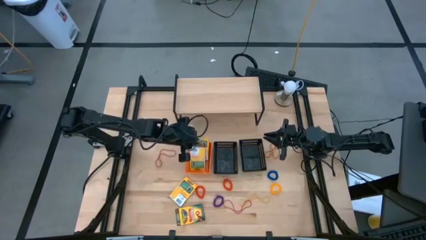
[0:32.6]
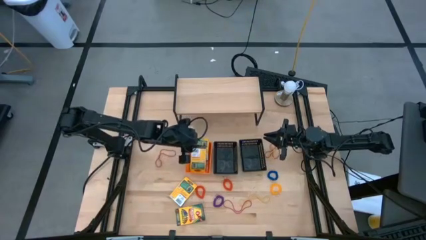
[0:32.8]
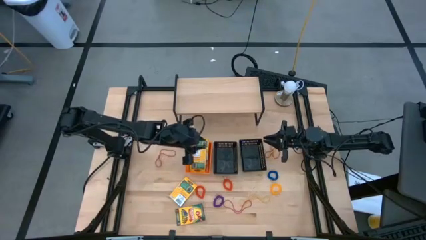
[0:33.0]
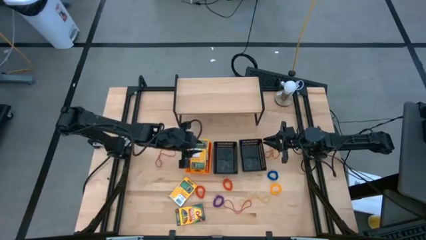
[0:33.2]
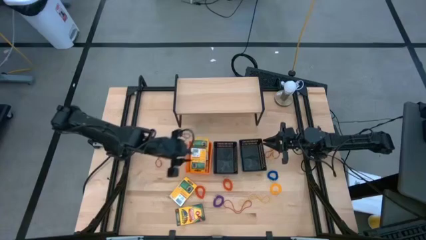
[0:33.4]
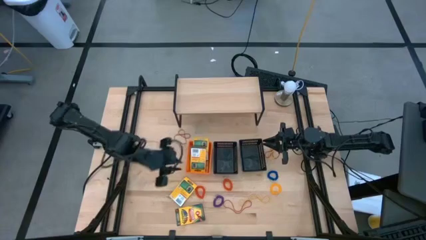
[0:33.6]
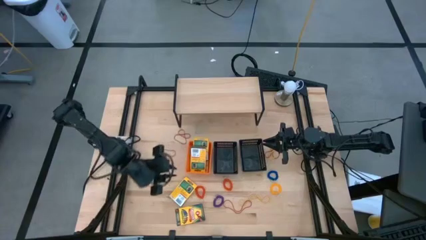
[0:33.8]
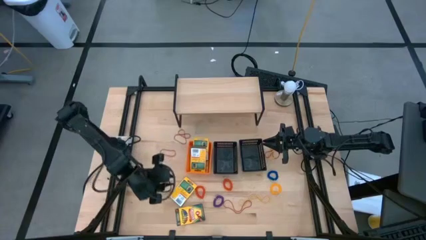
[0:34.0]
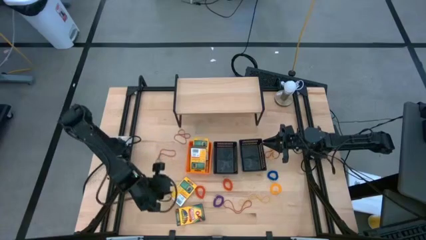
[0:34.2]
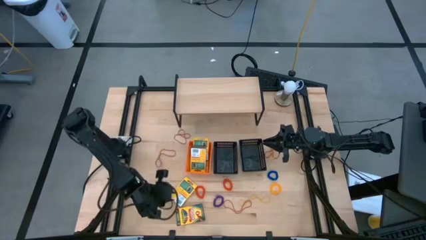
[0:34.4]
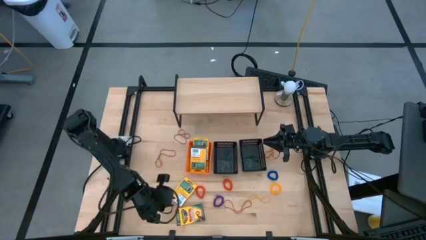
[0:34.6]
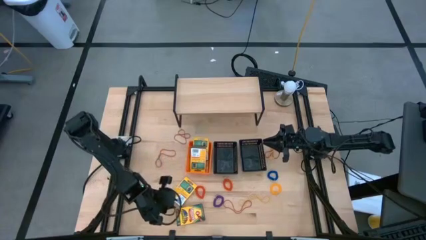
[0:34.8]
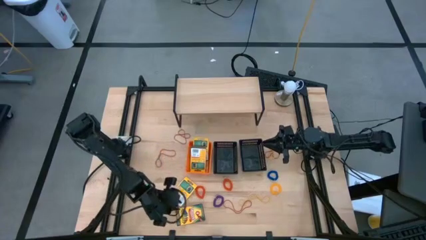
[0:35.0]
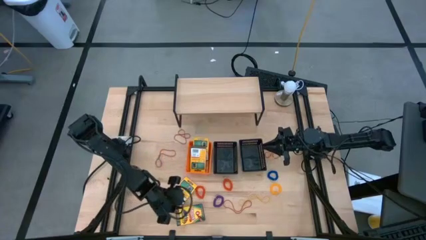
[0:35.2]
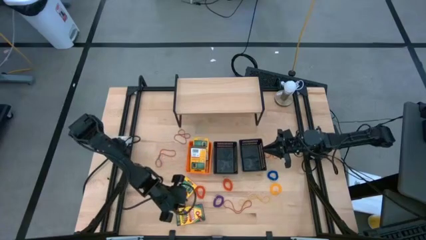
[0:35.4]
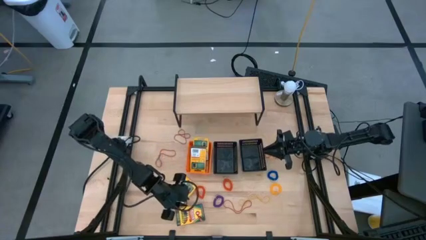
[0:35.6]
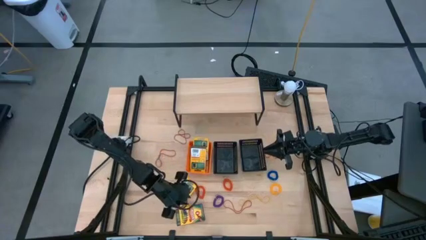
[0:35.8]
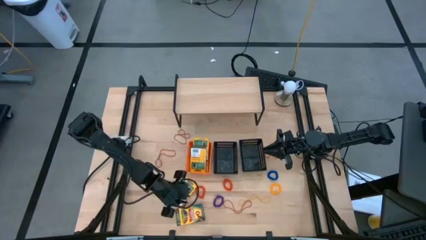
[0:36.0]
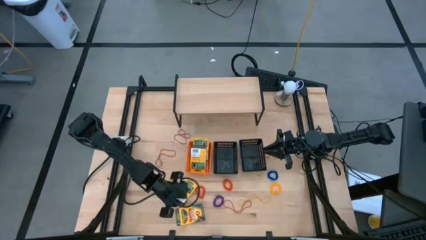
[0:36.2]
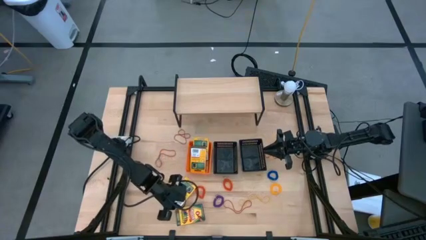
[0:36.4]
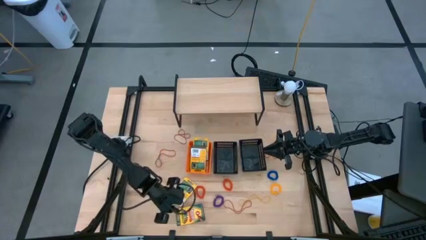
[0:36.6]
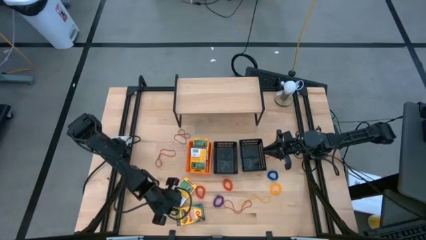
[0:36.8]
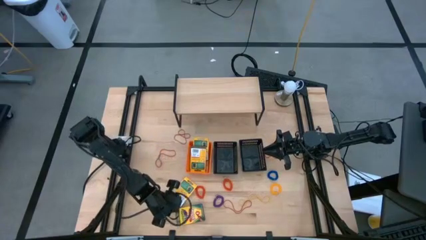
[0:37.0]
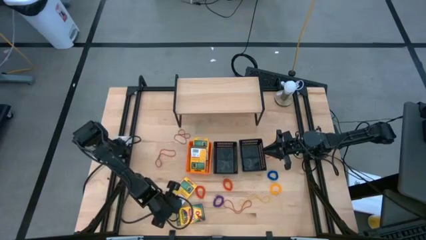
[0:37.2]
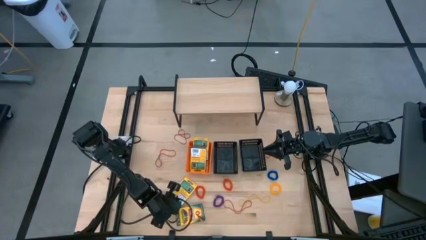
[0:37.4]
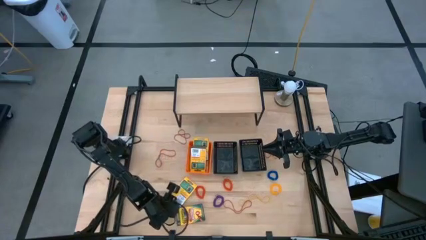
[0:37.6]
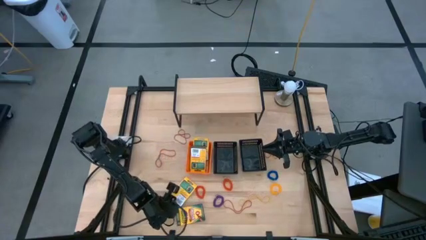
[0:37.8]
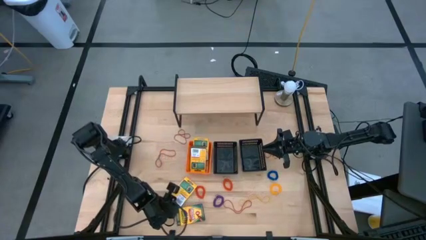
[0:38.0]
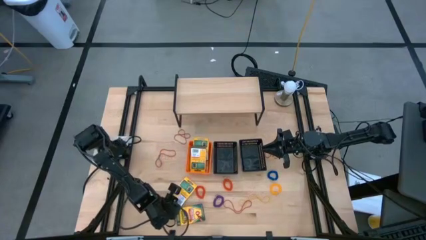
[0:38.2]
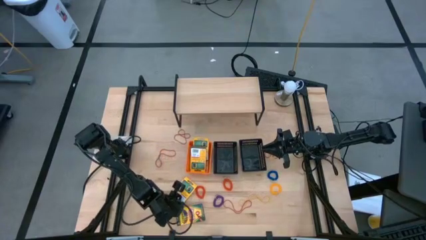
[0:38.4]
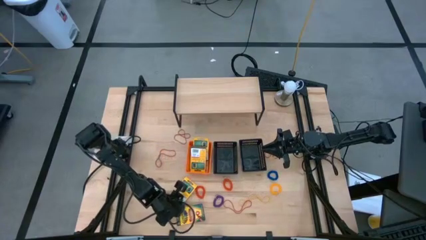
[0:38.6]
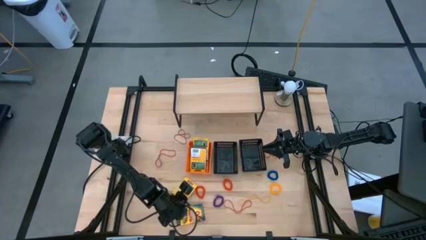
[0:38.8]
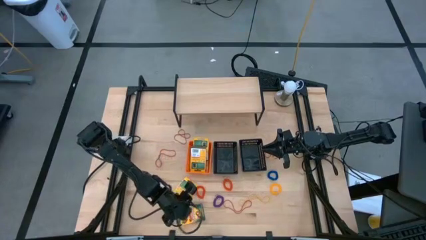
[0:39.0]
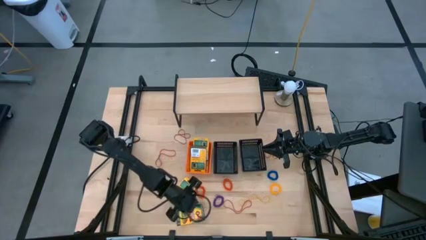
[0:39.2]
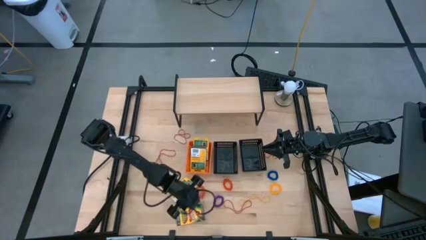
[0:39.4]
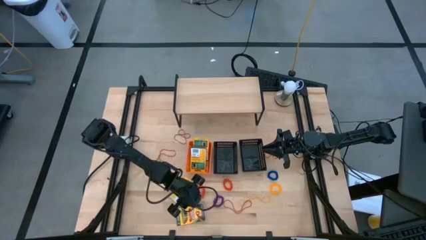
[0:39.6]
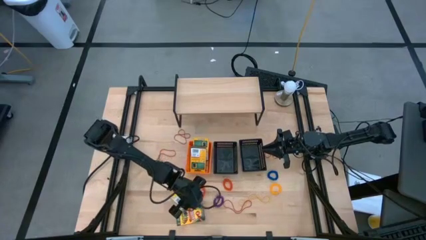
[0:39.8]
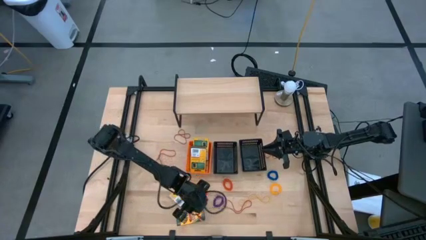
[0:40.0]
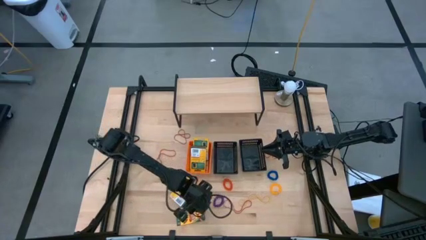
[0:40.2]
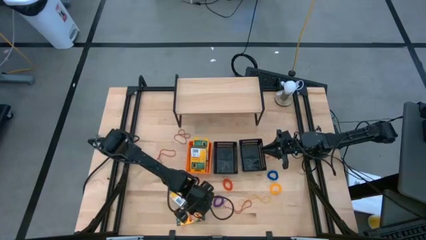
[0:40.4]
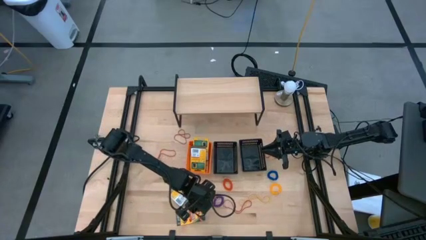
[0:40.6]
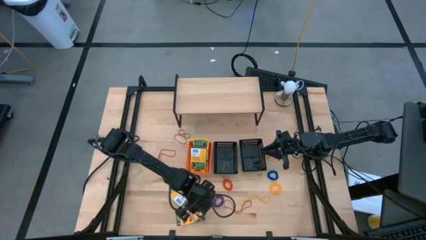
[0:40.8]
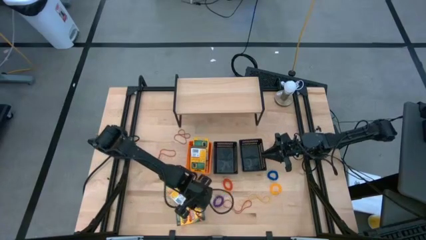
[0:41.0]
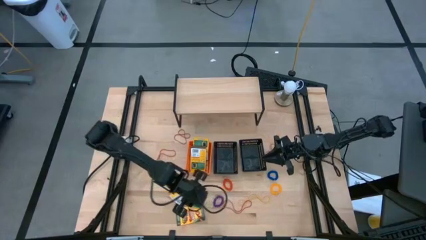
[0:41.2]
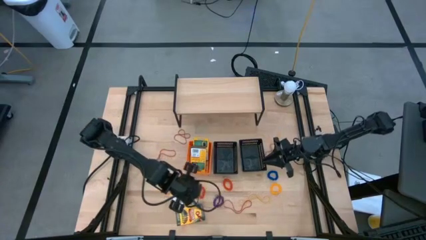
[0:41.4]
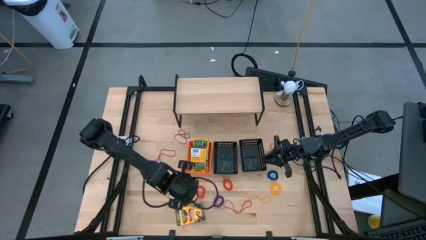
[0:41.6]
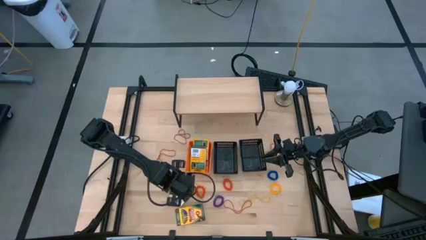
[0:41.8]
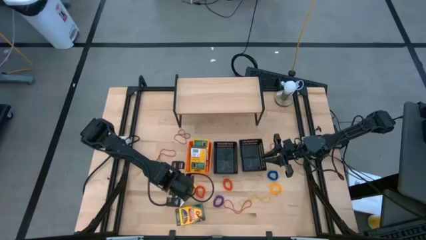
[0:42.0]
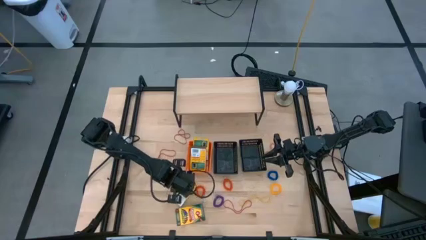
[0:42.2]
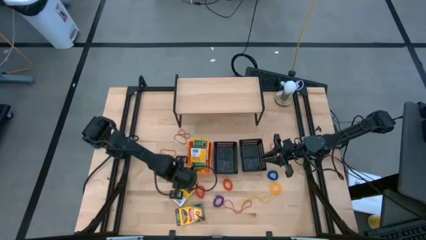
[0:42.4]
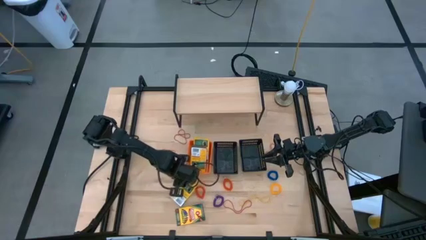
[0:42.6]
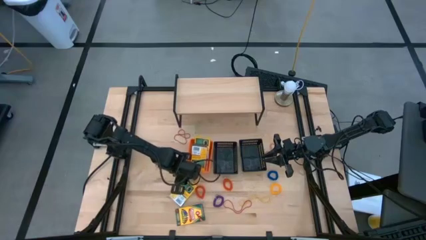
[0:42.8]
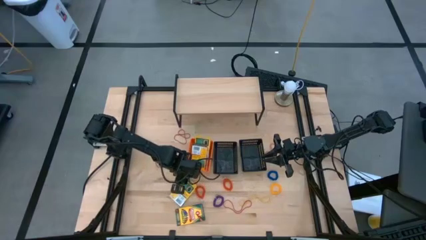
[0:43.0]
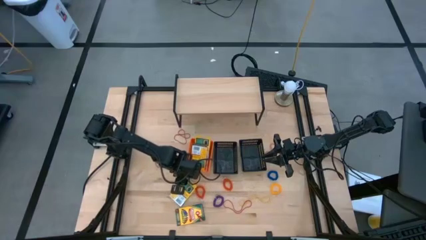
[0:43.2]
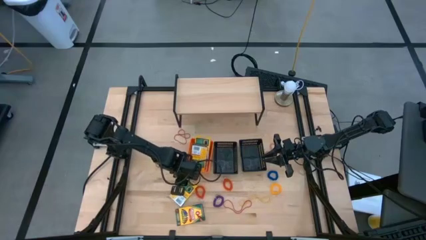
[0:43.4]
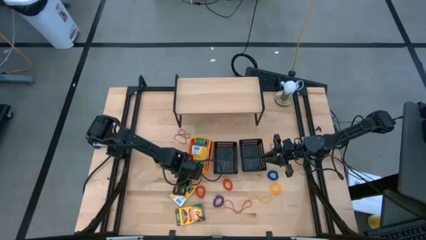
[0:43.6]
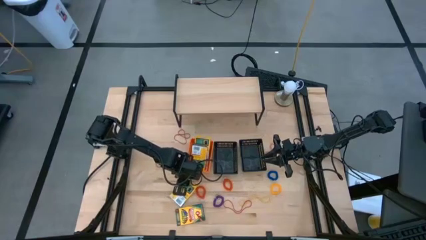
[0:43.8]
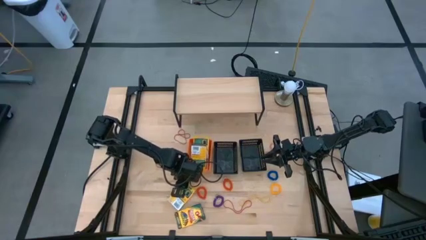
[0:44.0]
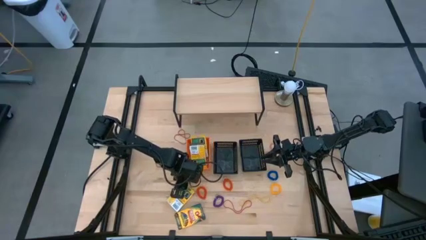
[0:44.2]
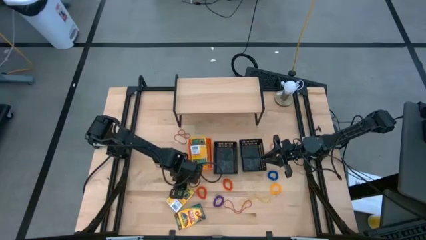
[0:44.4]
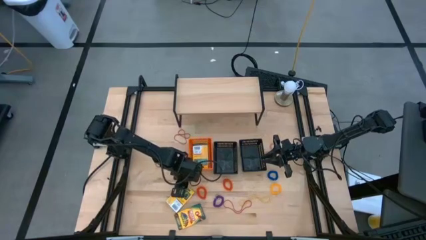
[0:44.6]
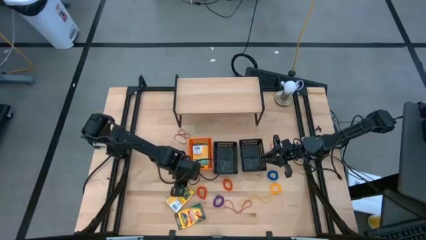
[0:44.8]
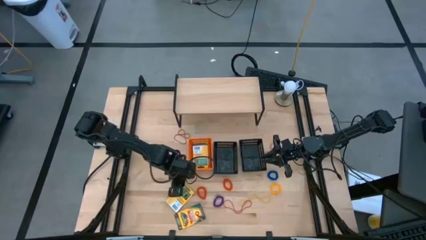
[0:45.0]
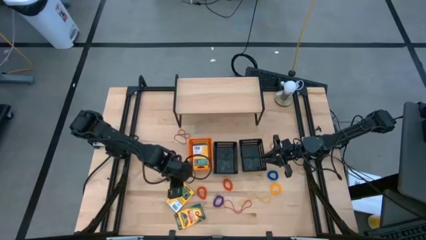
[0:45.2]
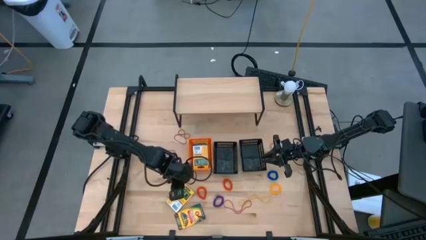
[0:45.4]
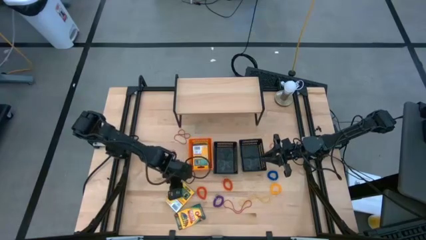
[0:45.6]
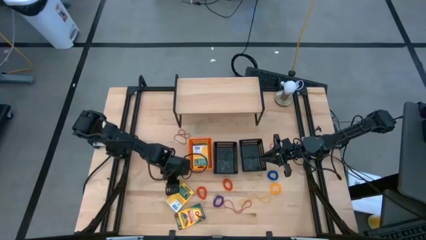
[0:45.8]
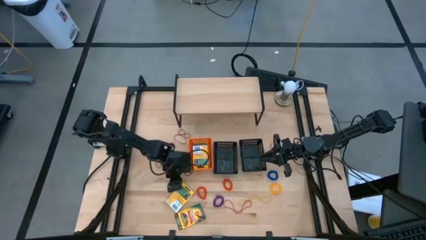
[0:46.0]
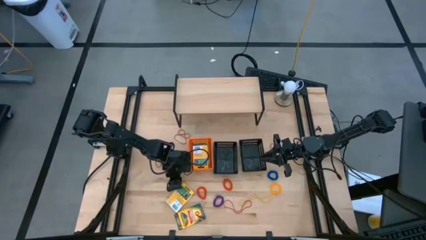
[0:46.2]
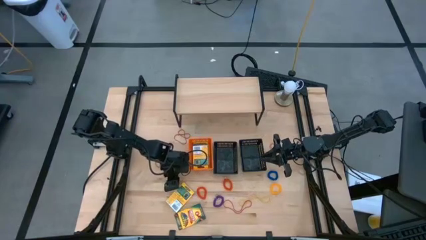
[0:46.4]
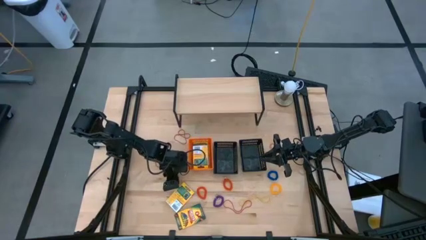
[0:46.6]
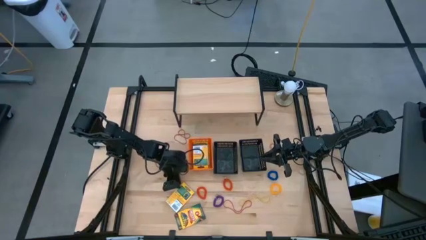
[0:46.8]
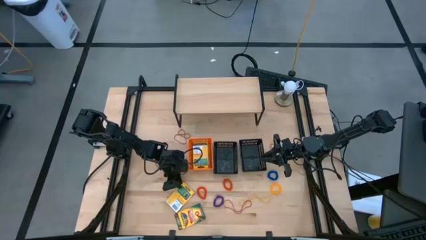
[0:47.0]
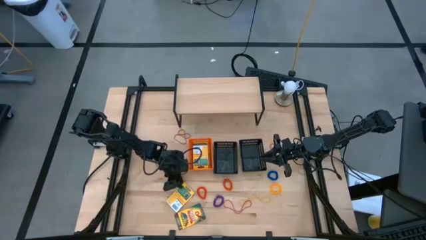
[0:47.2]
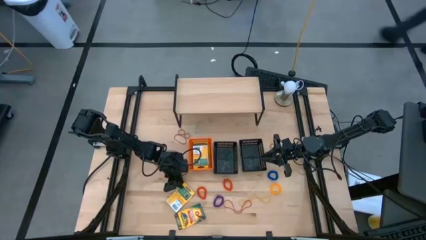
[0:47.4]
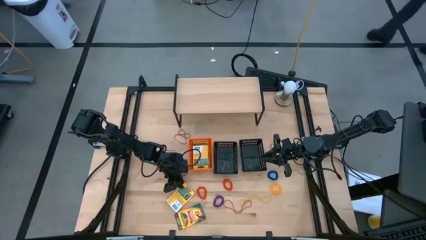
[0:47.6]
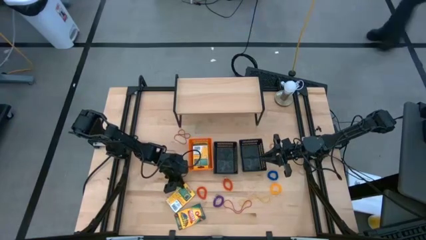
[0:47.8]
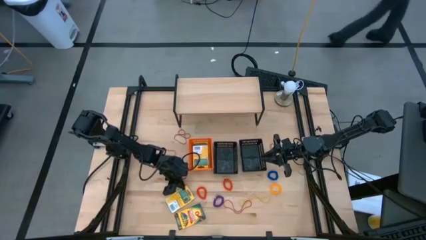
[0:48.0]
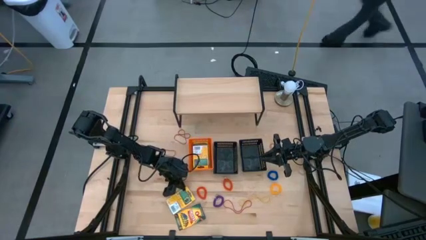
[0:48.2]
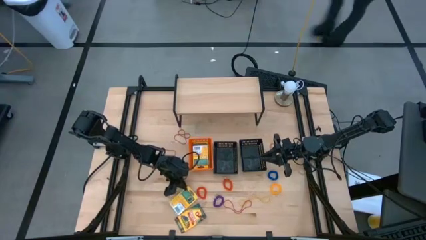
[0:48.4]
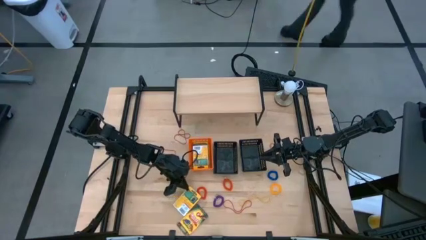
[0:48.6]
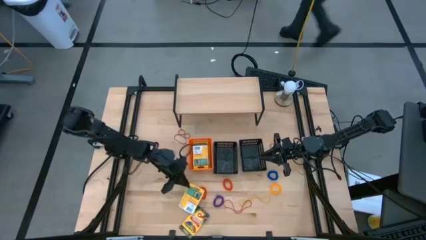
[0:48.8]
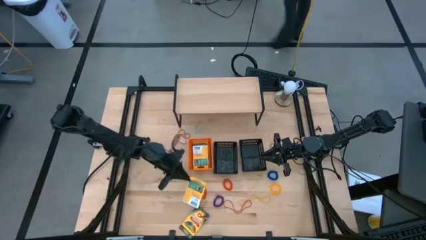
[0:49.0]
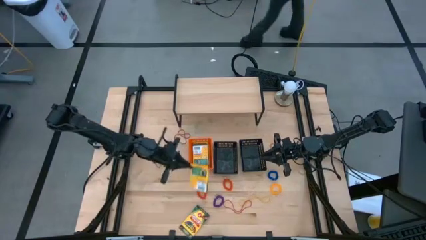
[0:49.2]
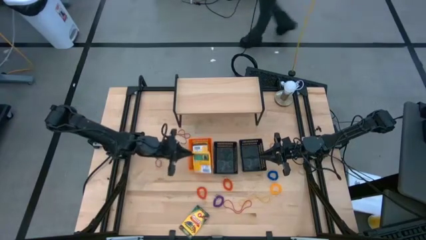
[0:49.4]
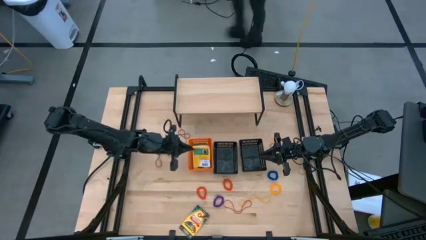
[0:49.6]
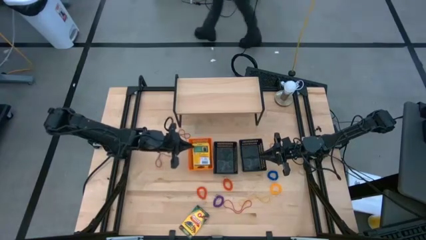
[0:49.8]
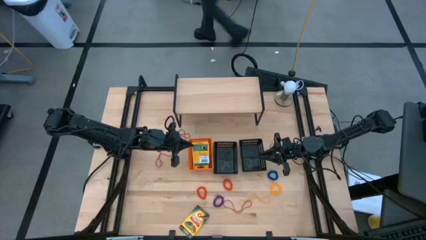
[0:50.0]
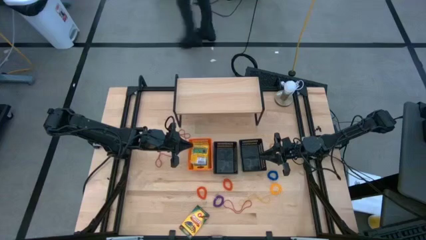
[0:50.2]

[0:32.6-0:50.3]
Task: Pick & Place Office Desk Supplies
Put the yellow crayon box into the orange bin
